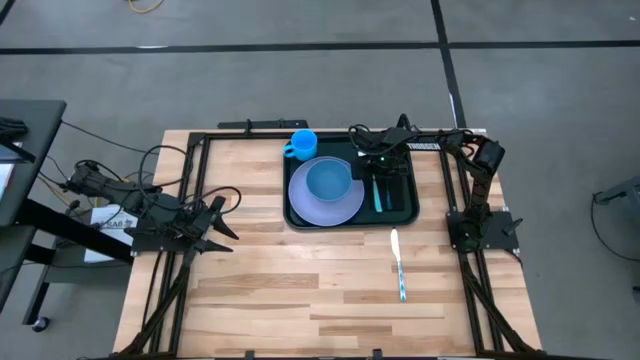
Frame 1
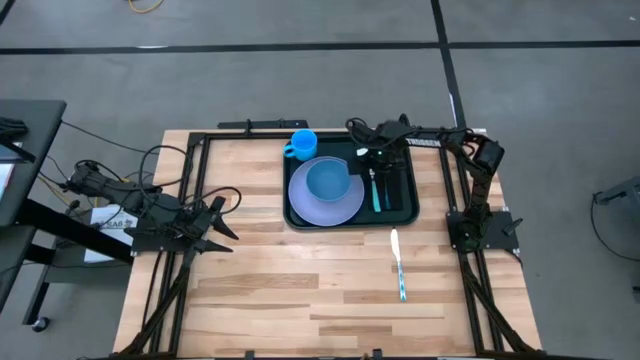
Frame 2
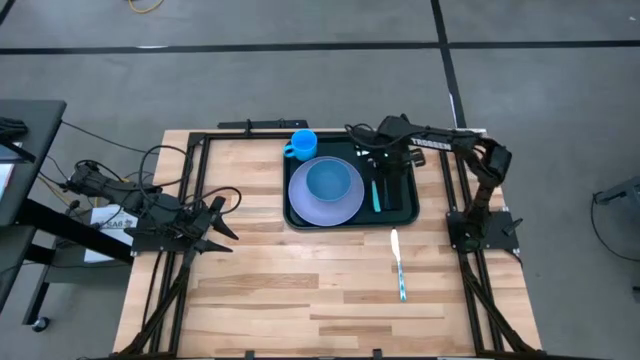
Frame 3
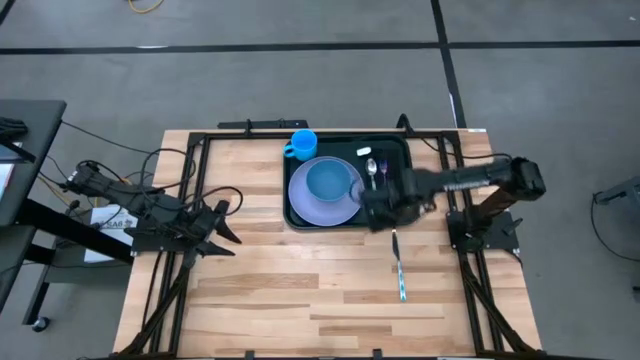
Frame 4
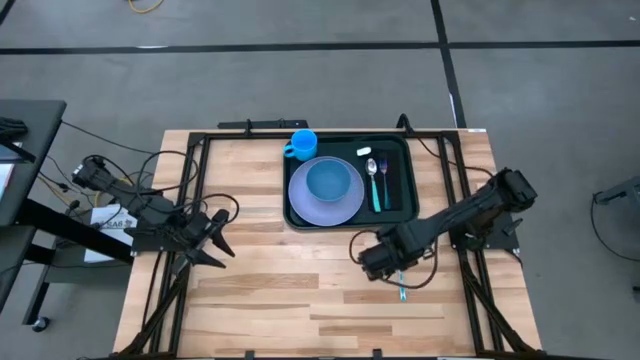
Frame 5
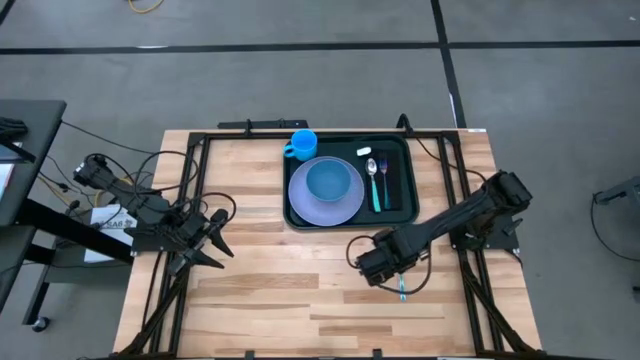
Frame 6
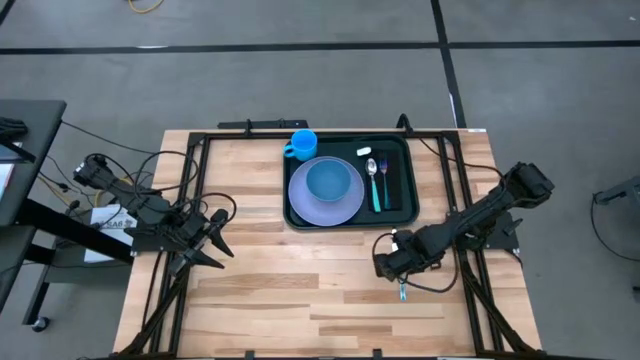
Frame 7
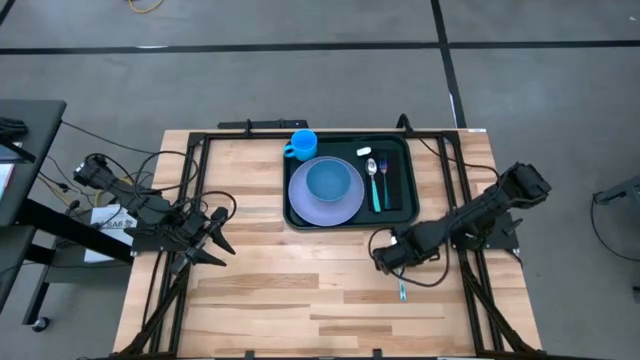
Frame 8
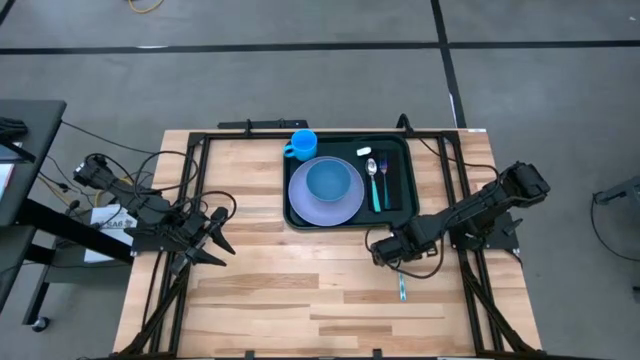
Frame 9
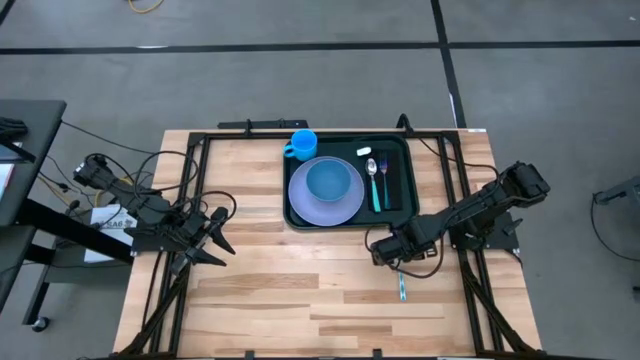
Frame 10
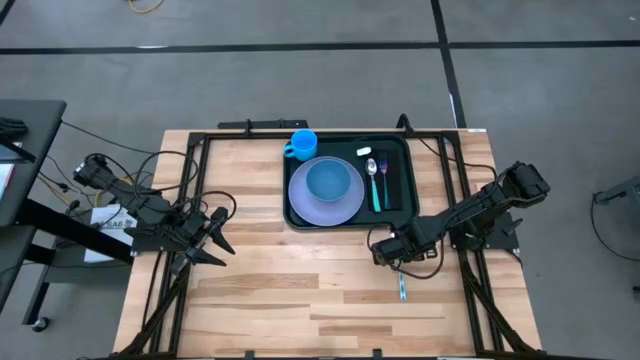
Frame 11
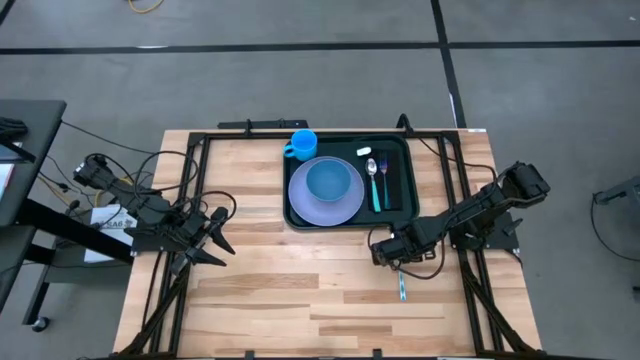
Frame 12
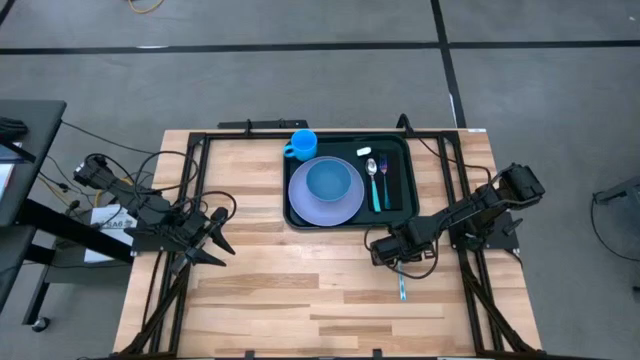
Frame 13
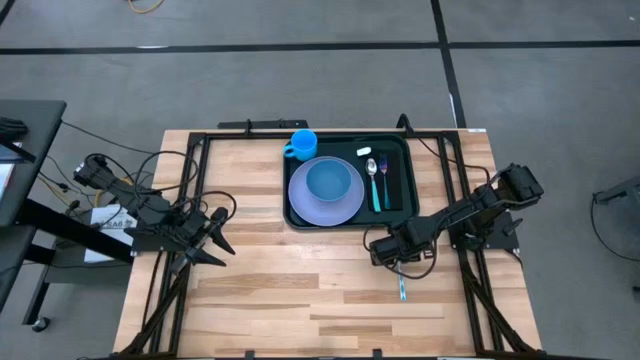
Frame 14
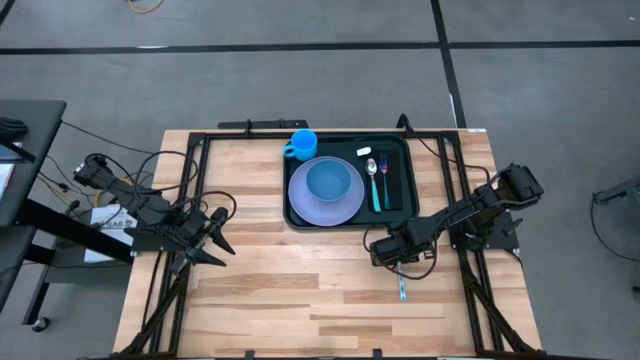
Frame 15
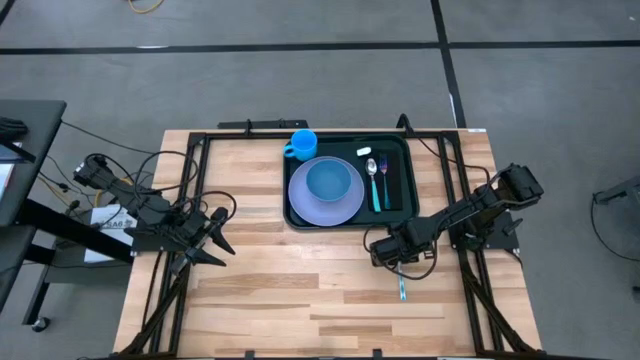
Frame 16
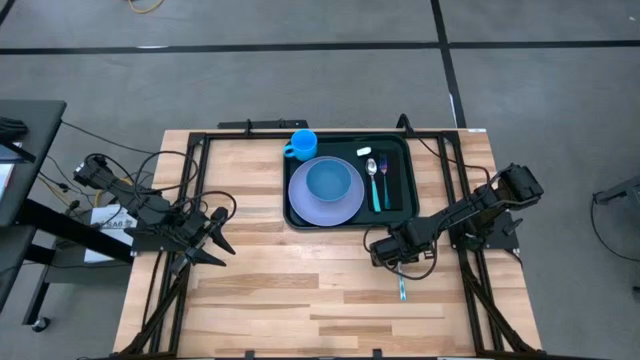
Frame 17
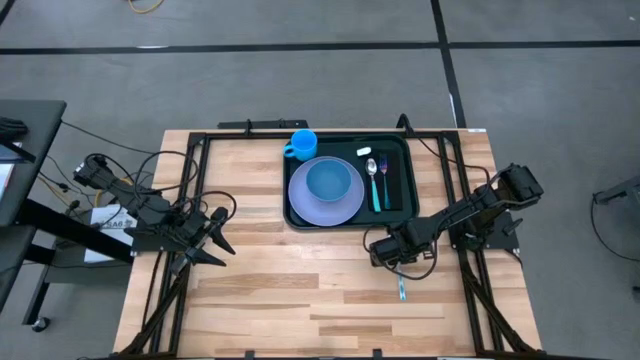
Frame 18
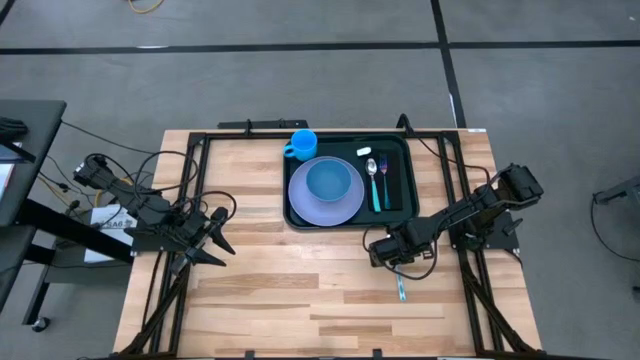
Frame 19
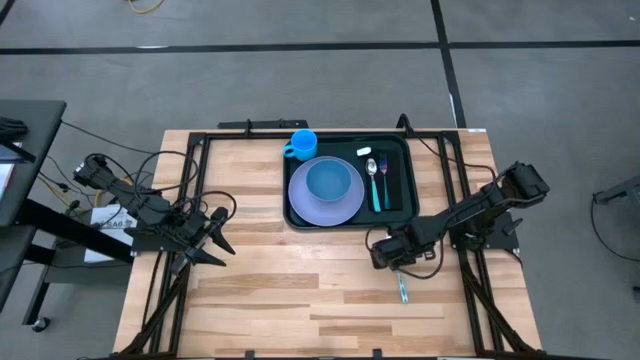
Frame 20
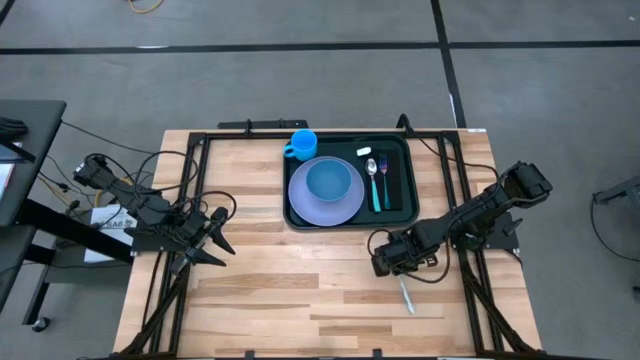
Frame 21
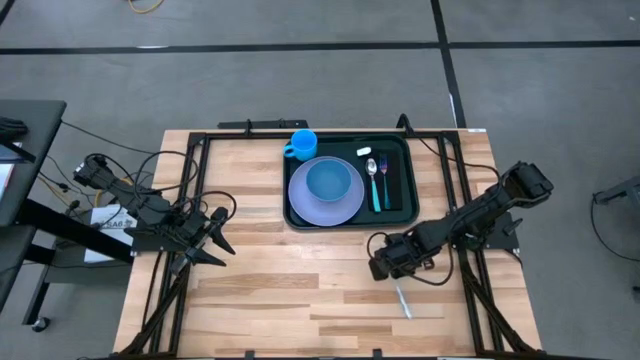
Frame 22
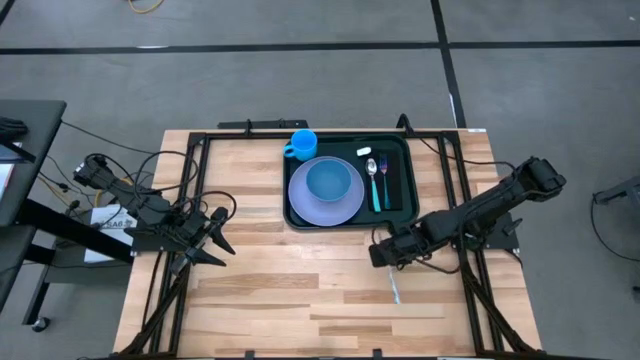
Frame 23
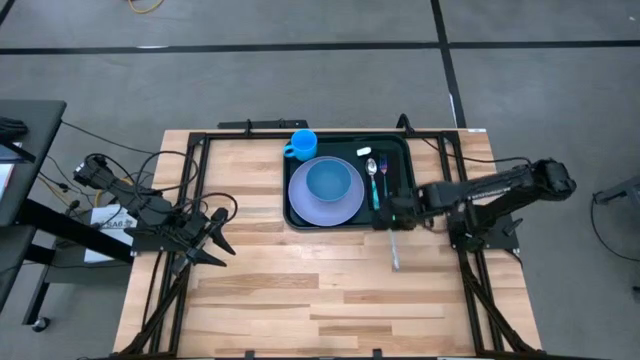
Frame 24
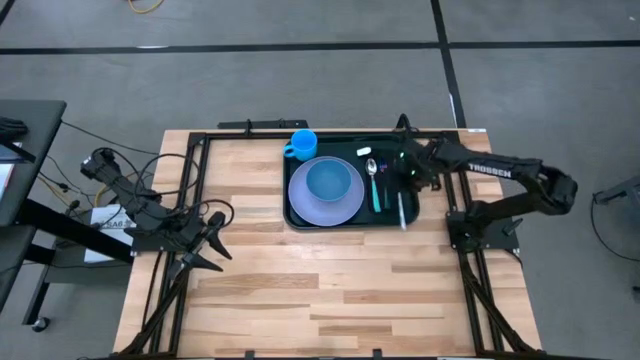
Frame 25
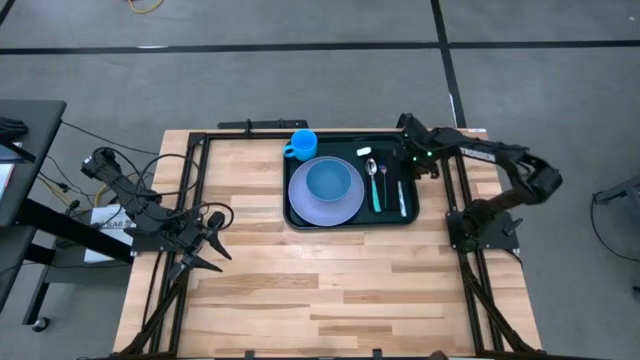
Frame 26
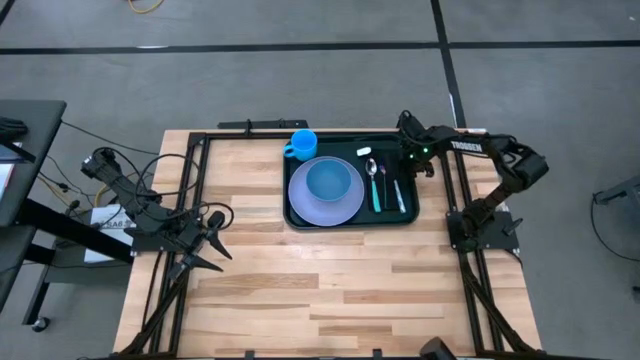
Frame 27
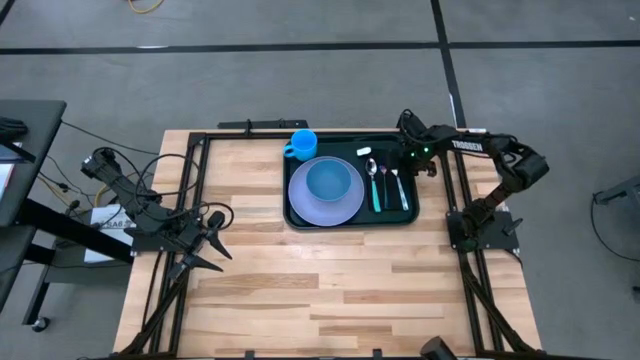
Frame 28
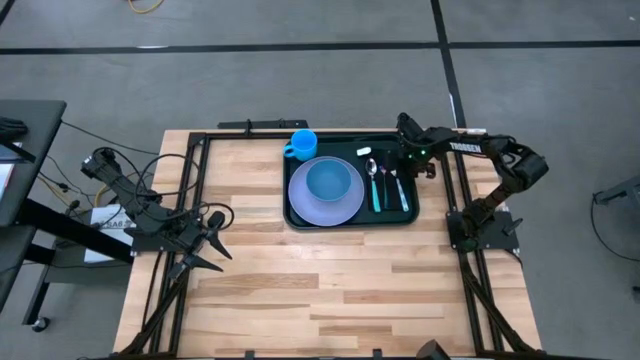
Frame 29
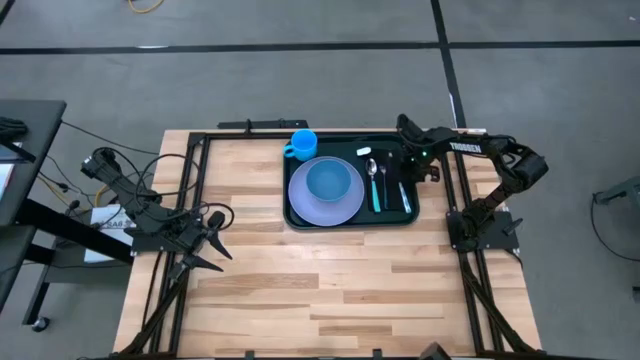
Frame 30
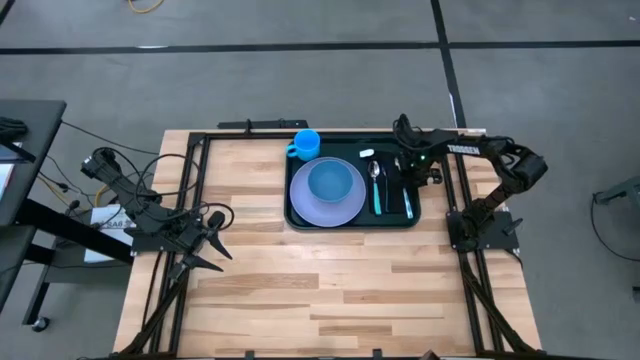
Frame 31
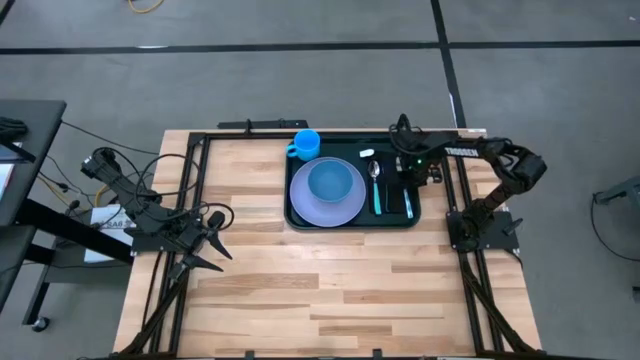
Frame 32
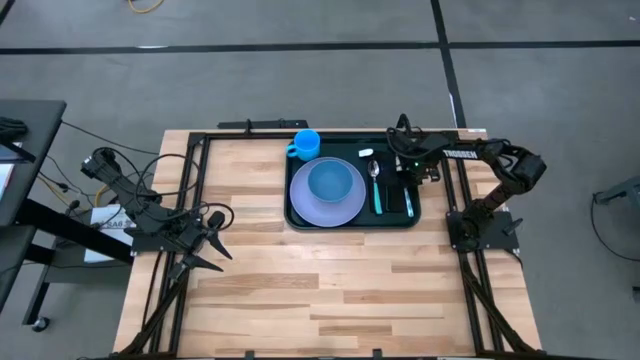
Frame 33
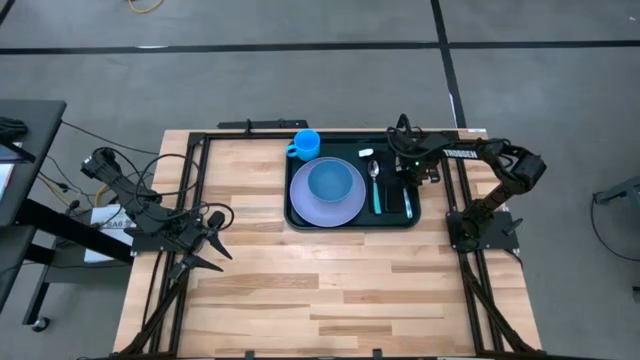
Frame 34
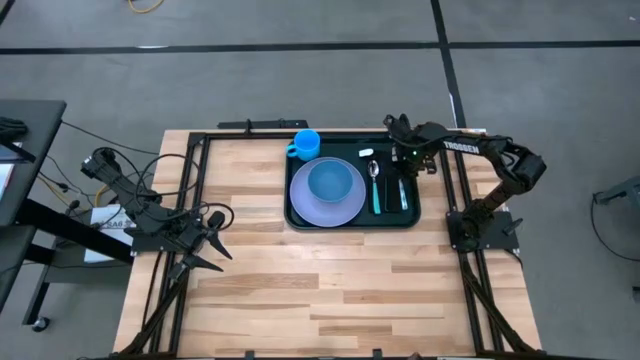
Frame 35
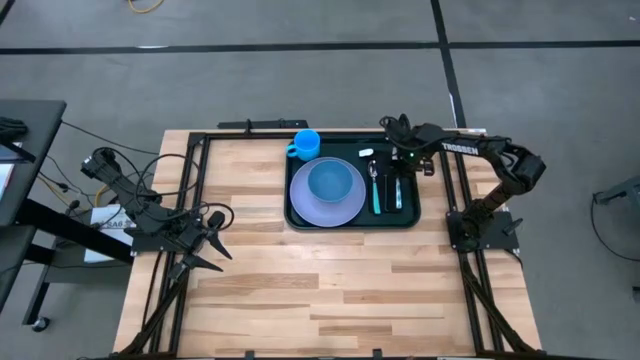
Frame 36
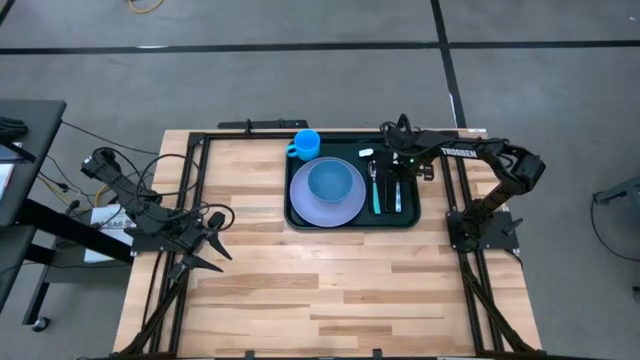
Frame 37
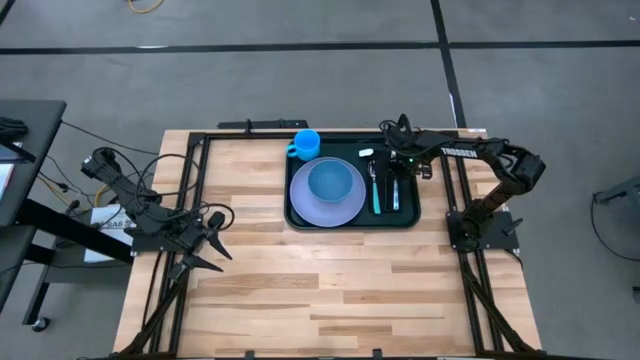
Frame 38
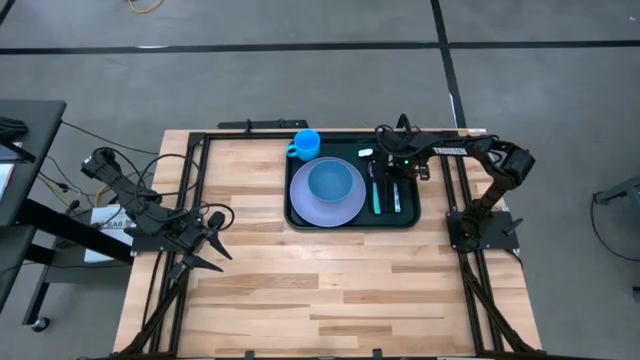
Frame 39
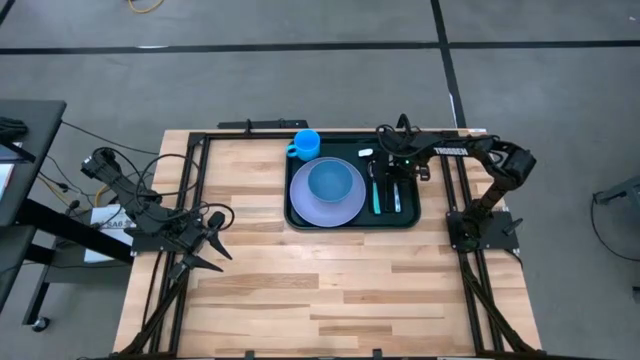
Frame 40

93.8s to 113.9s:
Task: Set up tray
Put the blue knife on the black napkin

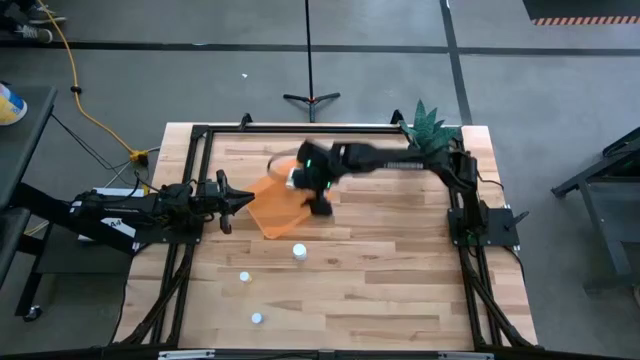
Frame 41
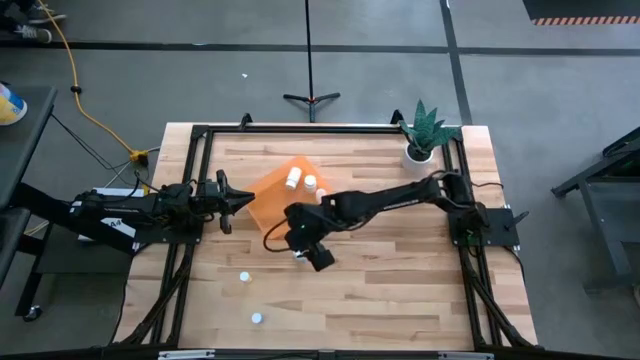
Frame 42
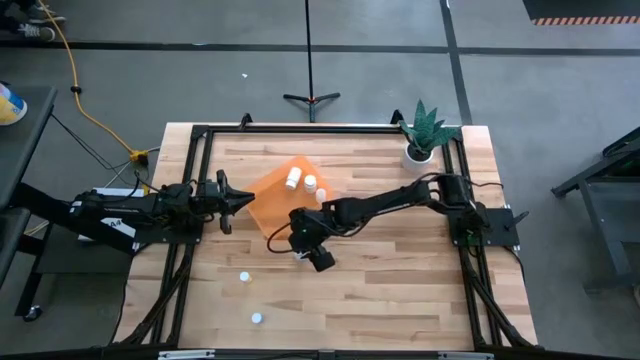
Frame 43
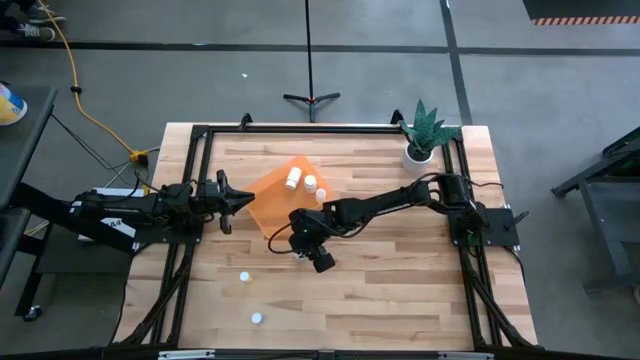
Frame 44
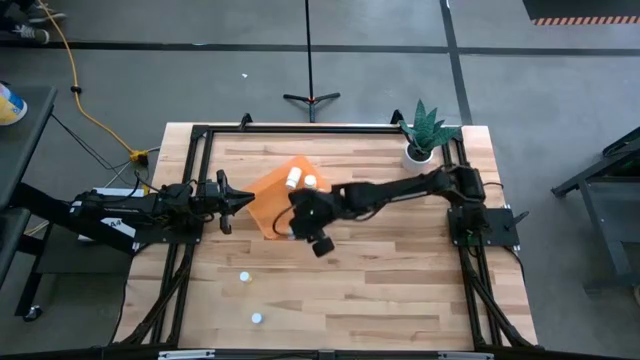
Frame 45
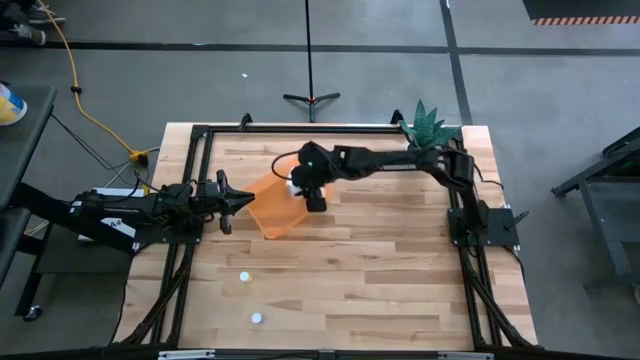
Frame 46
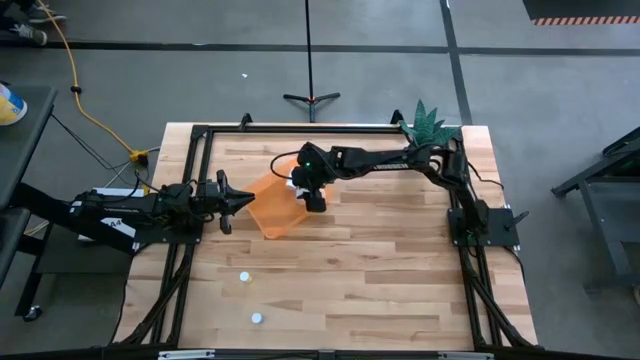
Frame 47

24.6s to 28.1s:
Task: Pick and place pill bottles into a basket
Put the white pill bottle into the orange bin
